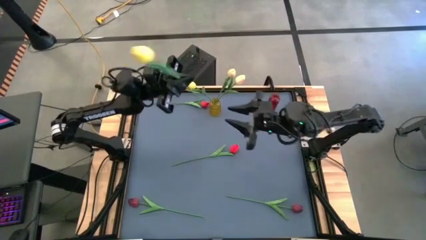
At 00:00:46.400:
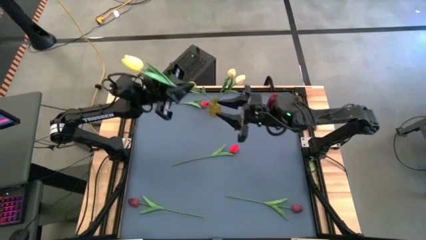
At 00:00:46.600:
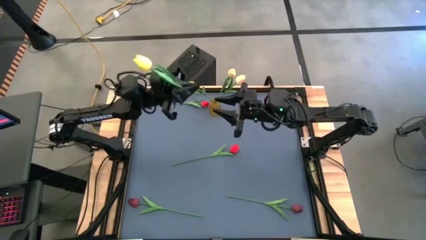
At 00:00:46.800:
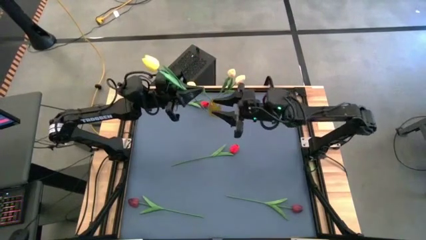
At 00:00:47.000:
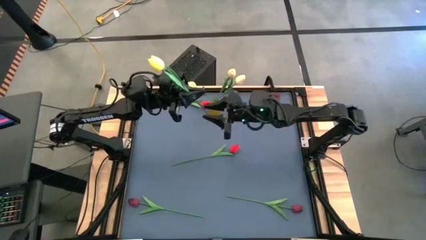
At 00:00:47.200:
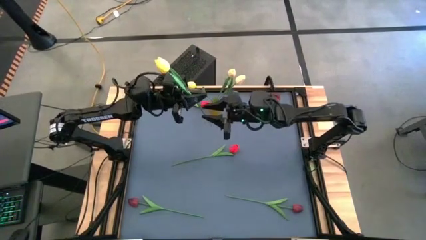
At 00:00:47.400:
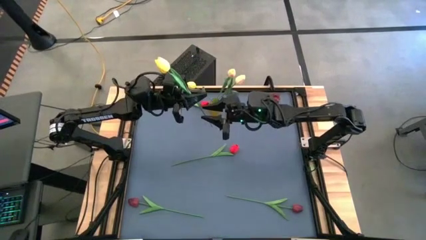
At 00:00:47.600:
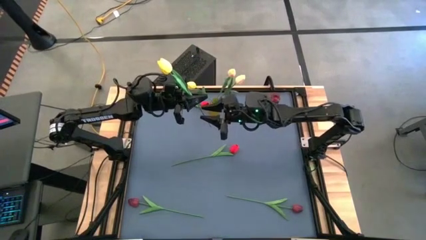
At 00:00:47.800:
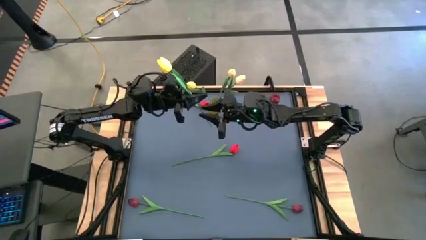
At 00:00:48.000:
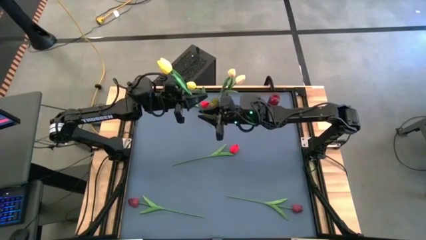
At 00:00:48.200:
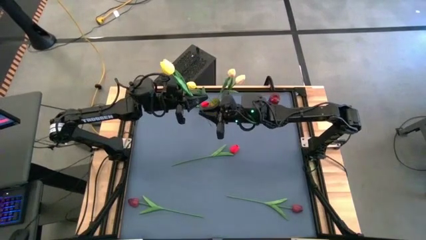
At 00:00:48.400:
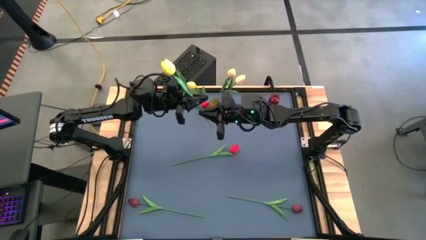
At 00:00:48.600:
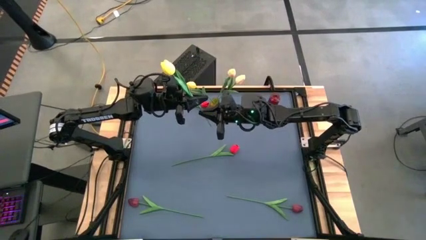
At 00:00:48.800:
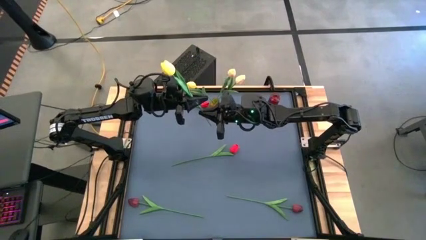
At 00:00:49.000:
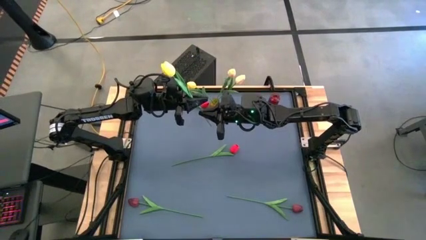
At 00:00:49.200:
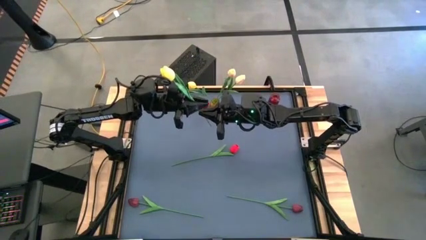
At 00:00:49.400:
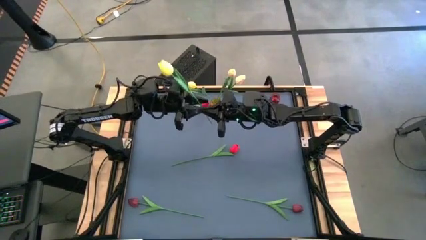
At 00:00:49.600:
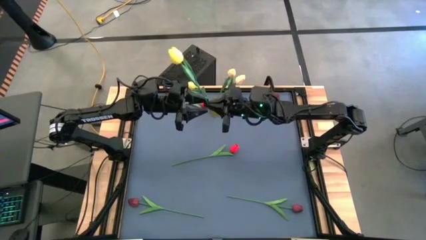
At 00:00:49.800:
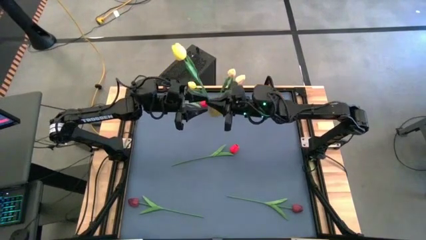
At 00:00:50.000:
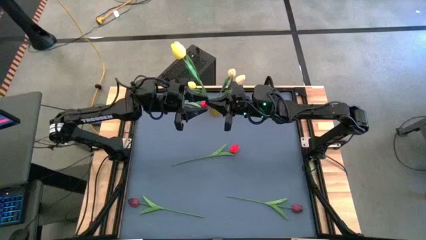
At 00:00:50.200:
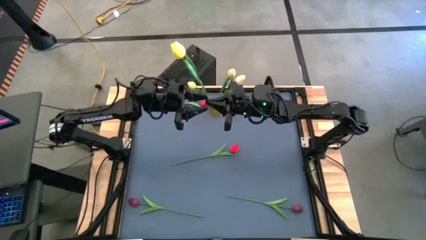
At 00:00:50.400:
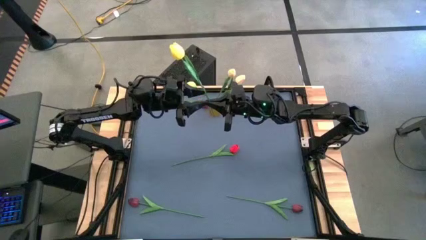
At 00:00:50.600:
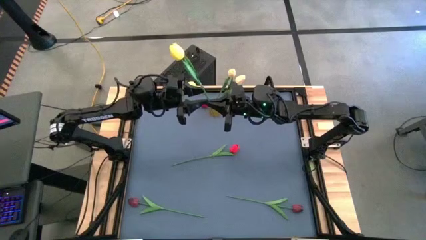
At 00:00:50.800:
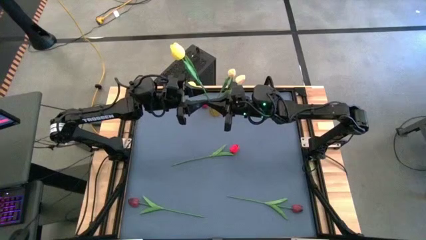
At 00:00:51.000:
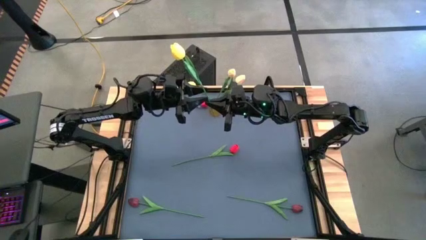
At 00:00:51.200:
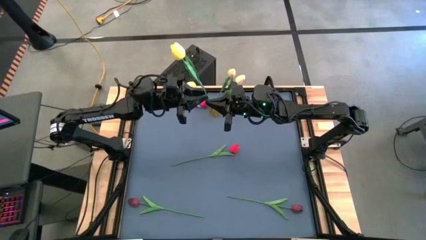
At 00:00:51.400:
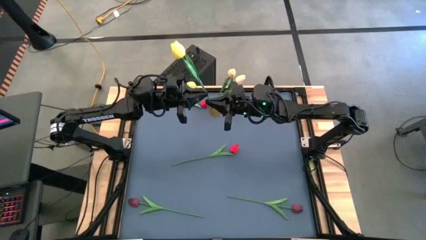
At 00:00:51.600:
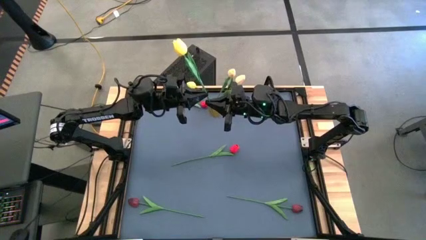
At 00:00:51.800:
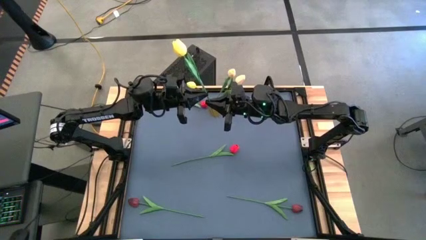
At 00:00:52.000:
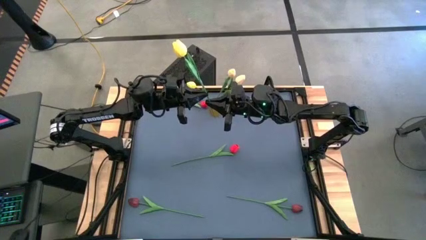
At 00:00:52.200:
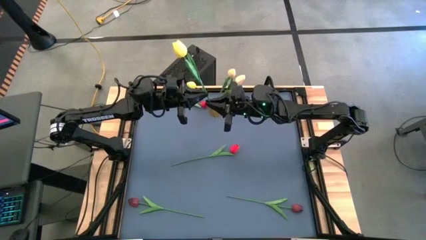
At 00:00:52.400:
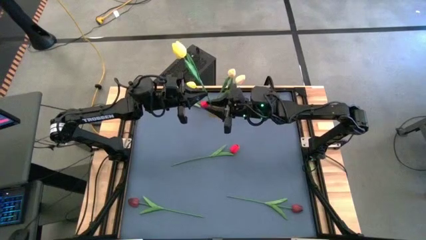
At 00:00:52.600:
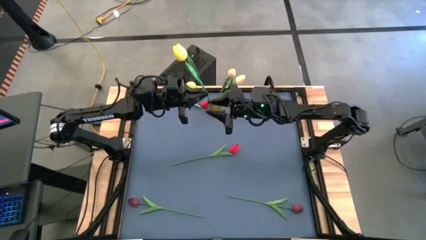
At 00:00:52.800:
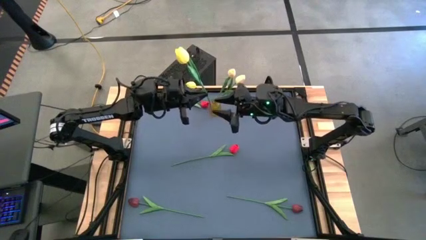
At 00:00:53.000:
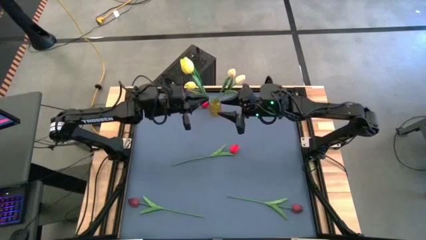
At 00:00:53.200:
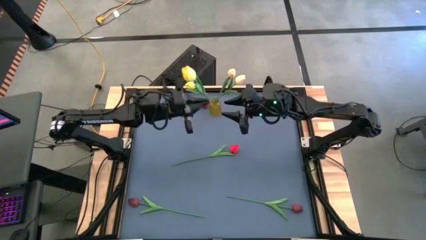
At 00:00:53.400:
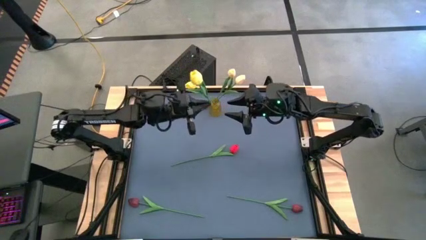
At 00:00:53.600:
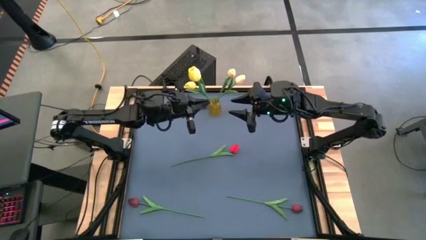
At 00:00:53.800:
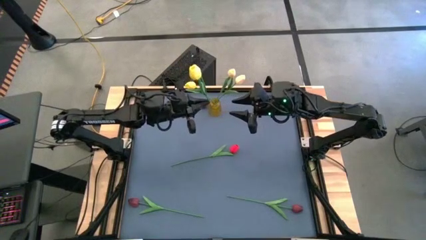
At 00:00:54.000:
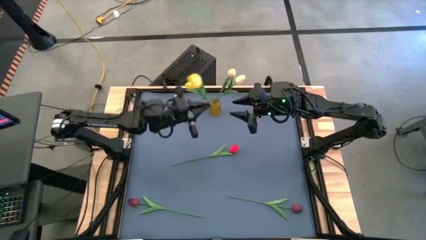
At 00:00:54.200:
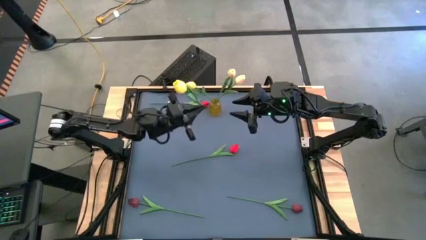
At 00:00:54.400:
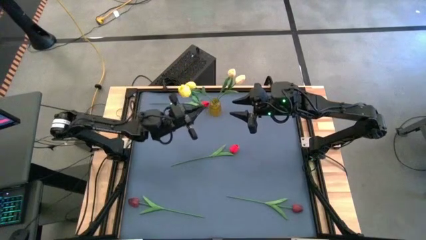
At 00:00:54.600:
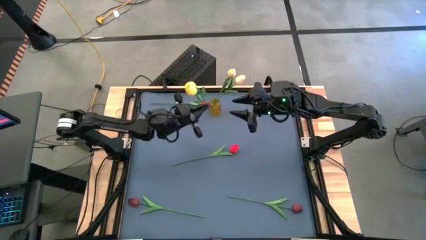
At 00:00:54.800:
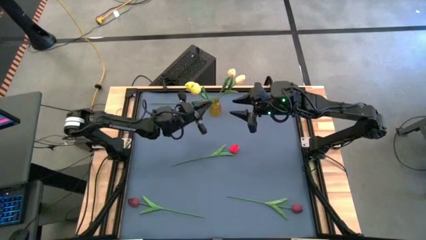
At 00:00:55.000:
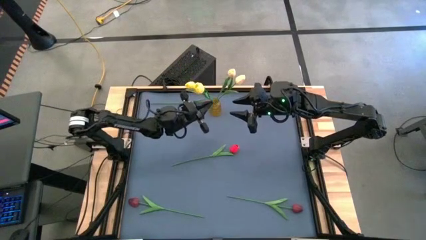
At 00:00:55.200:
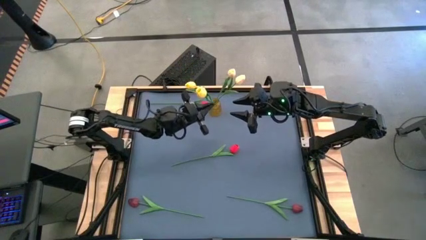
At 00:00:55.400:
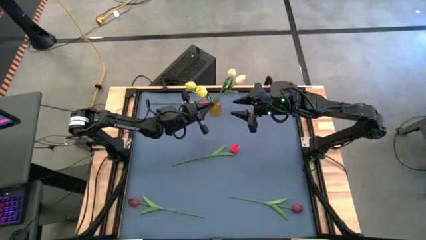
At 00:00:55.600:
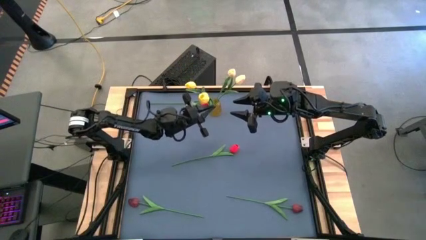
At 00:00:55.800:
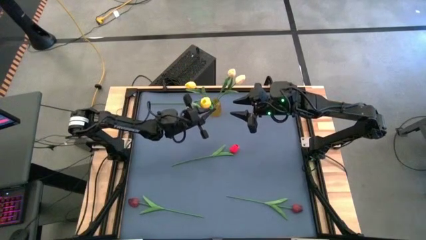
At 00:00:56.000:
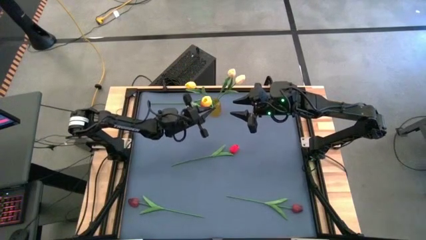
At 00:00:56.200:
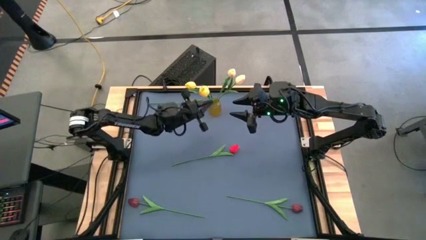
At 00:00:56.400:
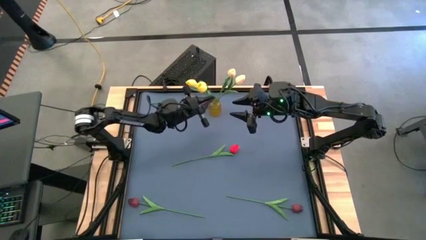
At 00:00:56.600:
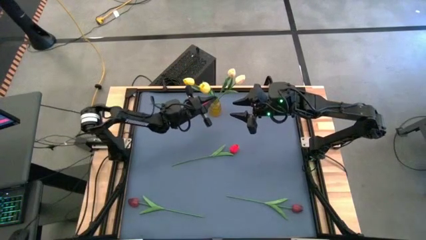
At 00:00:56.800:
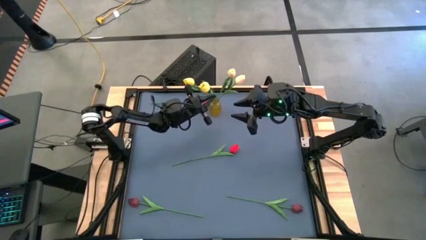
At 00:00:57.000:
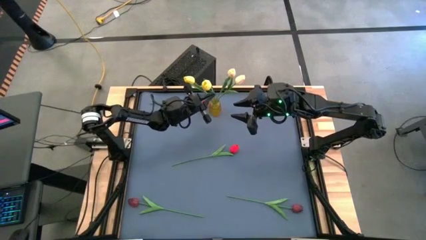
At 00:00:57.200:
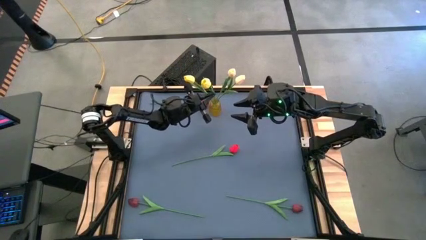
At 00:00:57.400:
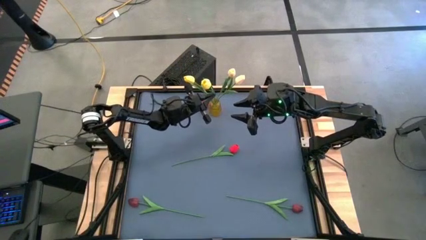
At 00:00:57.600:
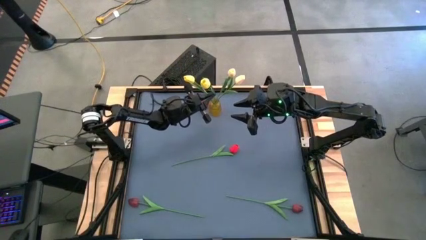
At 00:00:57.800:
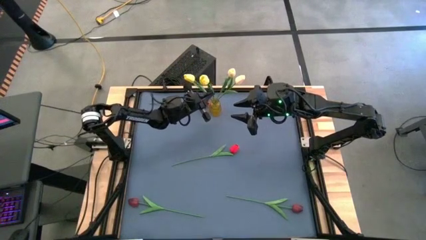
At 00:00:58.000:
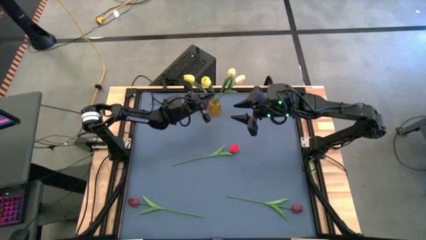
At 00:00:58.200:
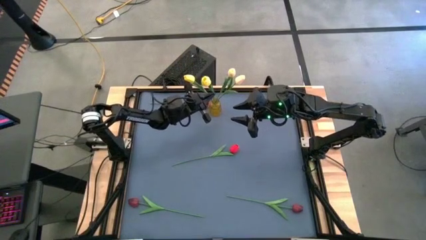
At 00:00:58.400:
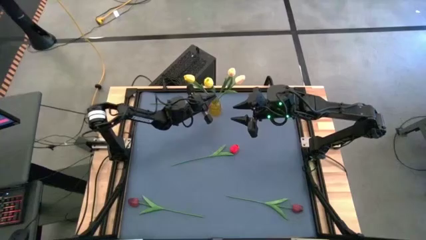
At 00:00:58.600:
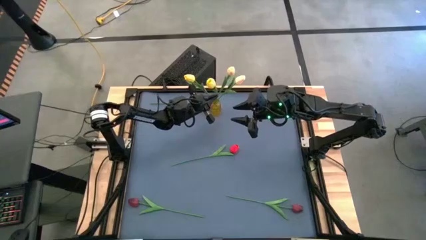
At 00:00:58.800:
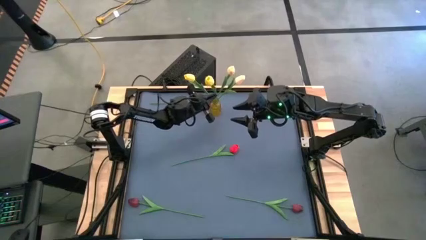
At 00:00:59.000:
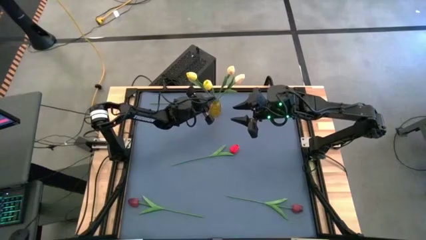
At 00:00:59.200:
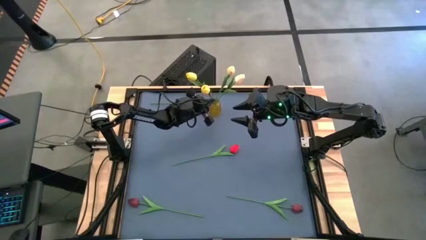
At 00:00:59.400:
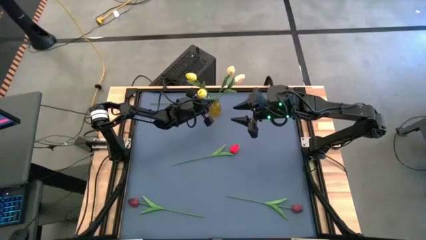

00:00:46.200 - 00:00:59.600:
Task: Sort flowers into vase by color
Put the yellow flower into the yellow vase

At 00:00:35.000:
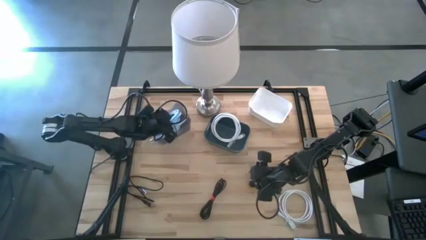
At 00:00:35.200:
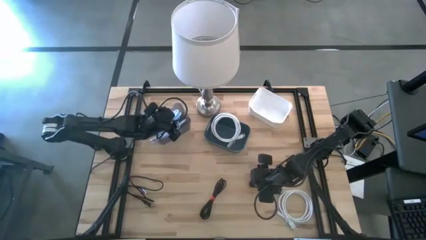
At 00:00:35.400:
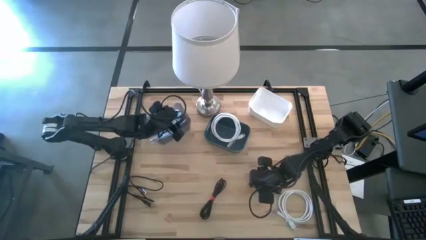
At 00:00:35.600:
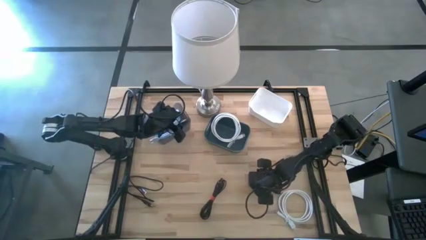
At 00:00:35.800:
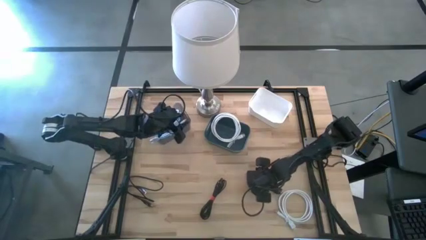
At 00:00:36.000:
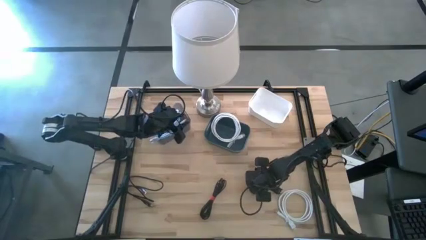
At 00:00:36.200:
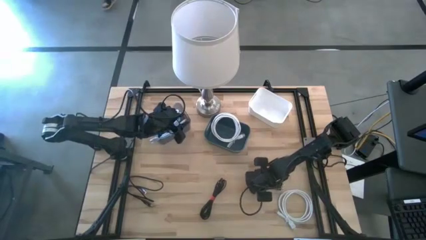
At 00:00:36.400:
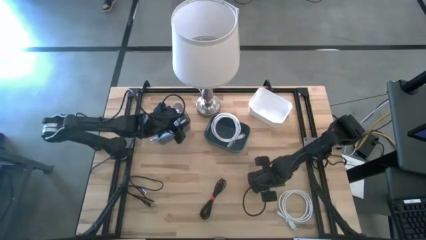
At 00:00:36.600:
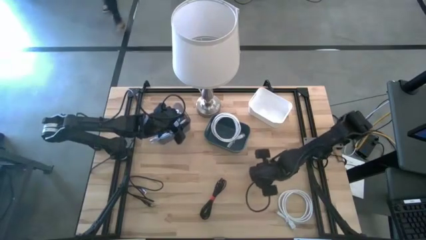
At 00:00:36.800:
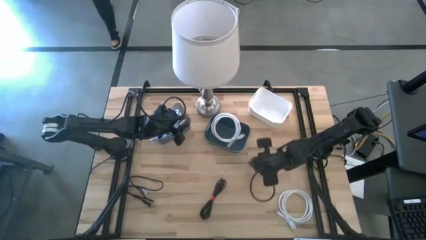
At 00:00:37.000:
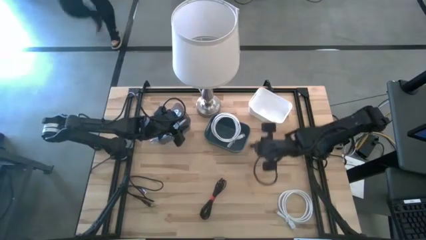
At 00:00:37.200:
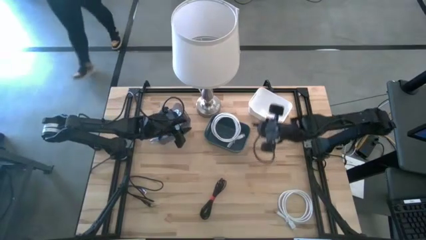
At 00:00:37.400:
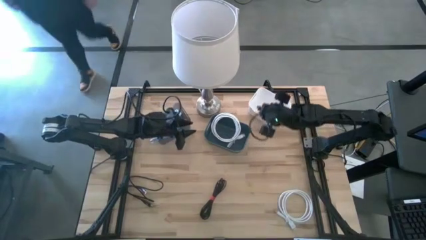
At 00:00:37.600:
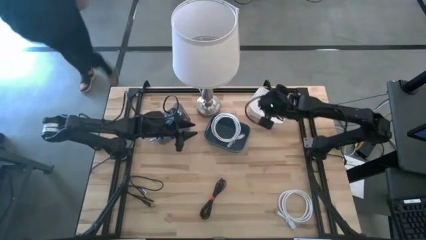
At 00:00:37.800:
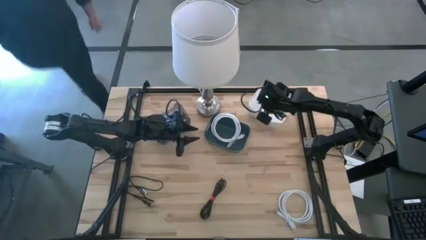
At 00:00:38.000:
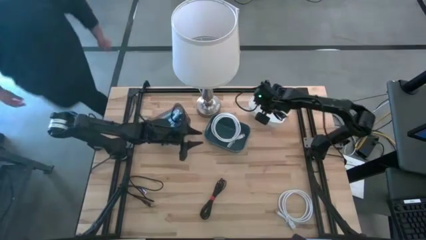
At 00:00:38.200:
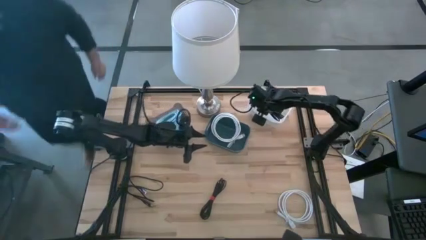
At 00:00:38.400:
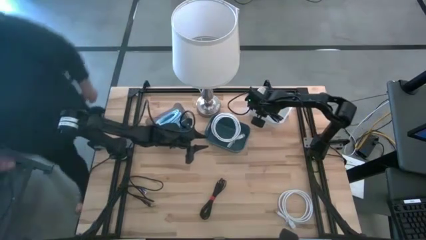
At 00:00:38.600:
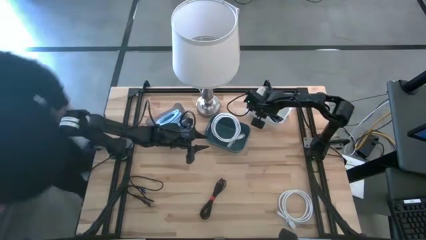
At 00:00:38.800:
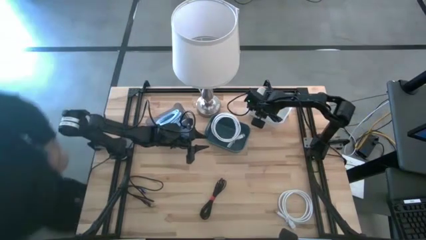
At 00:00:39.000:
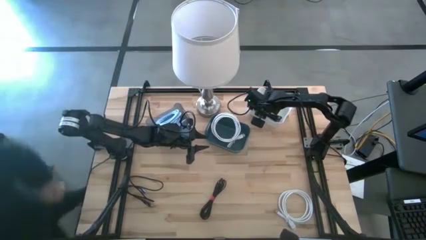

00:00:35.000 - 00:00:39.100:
Task: Pick & Place USB Port
Put the right black charger cable into the white bin
